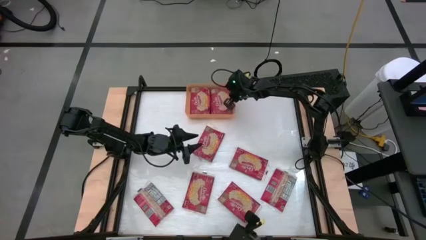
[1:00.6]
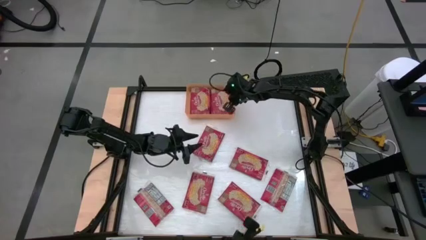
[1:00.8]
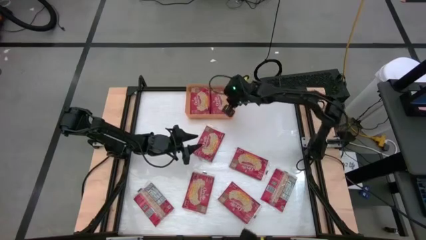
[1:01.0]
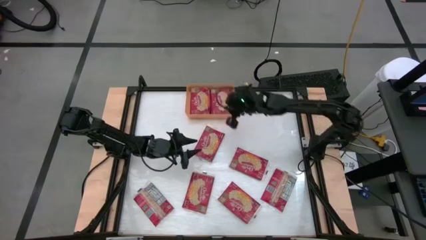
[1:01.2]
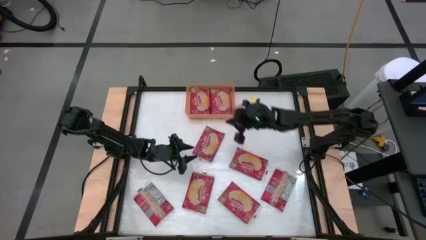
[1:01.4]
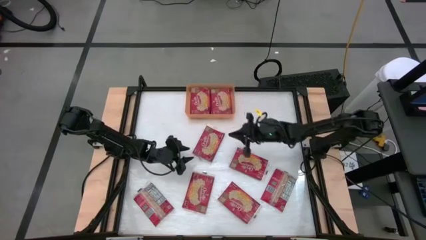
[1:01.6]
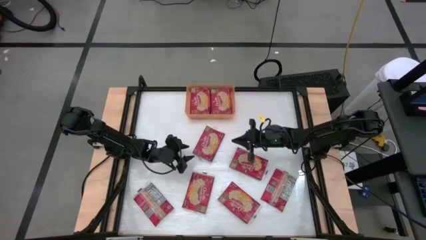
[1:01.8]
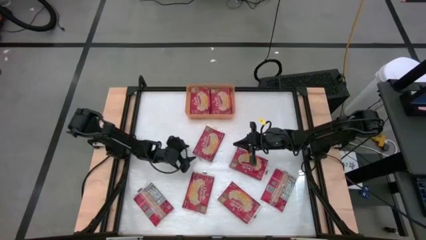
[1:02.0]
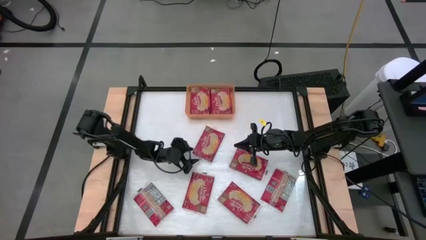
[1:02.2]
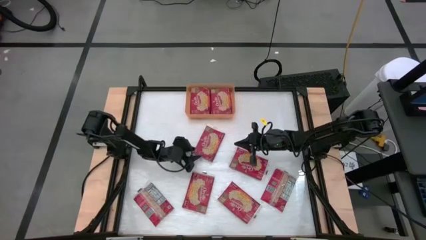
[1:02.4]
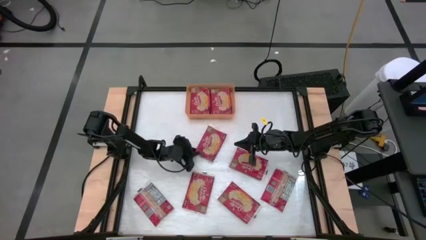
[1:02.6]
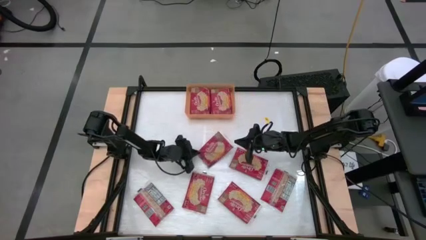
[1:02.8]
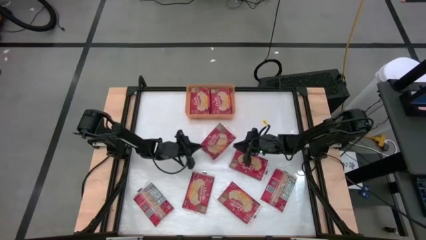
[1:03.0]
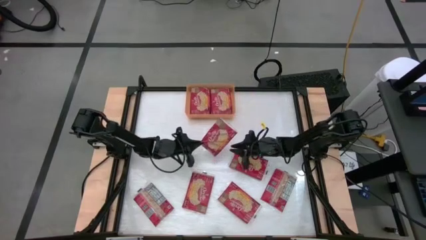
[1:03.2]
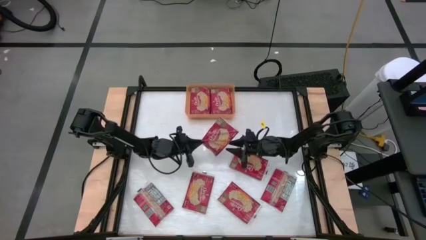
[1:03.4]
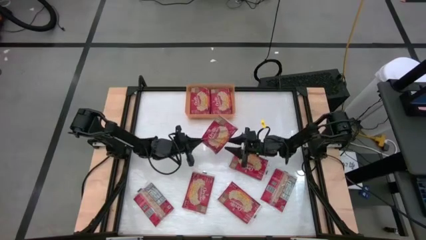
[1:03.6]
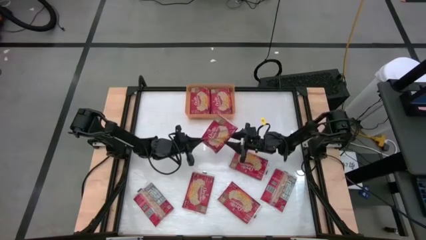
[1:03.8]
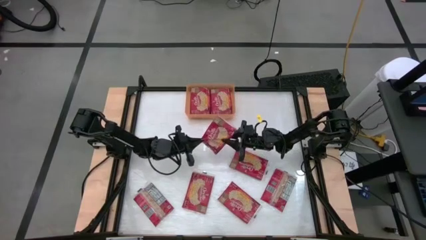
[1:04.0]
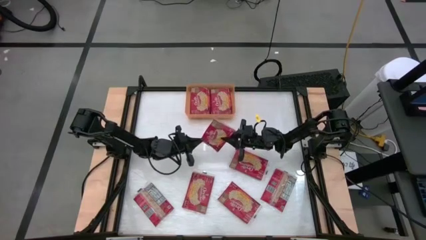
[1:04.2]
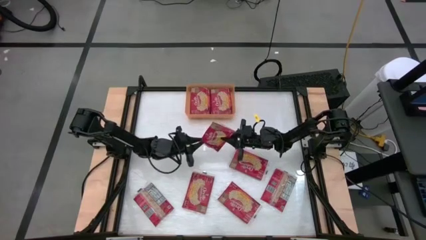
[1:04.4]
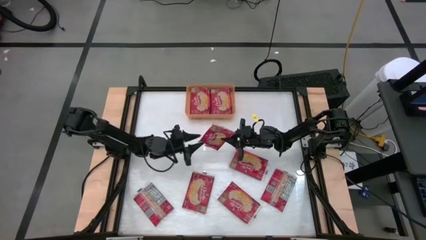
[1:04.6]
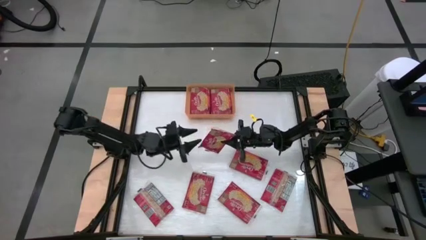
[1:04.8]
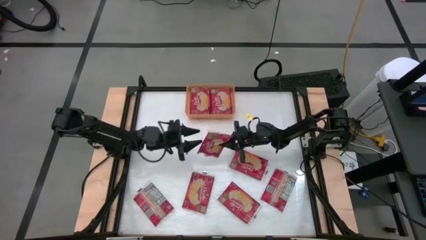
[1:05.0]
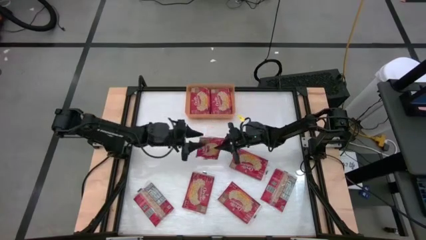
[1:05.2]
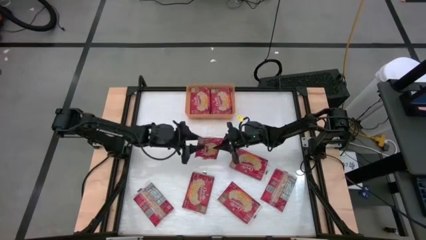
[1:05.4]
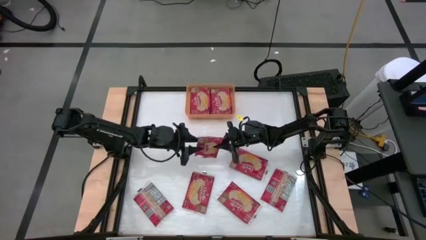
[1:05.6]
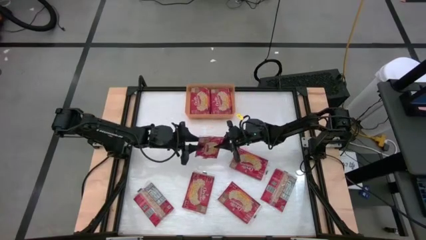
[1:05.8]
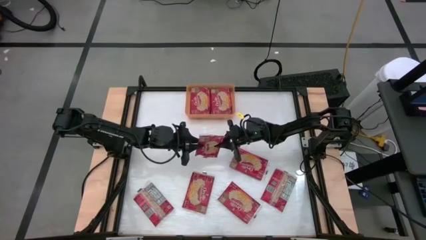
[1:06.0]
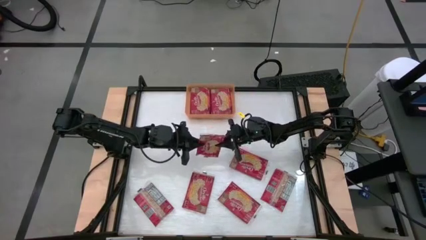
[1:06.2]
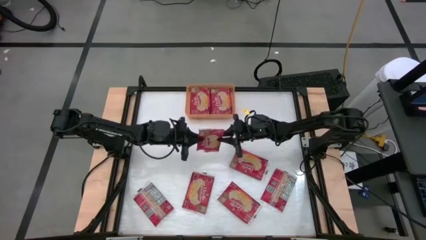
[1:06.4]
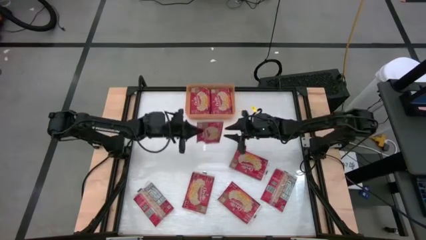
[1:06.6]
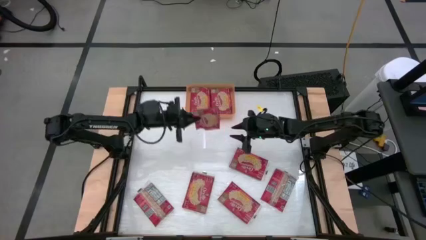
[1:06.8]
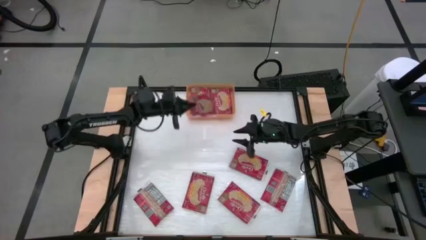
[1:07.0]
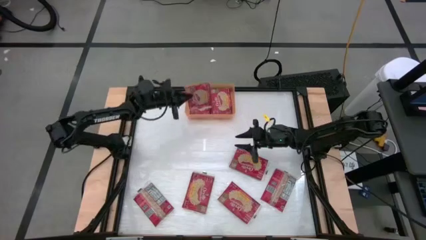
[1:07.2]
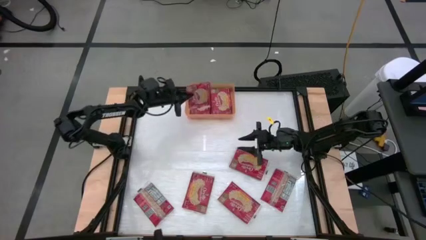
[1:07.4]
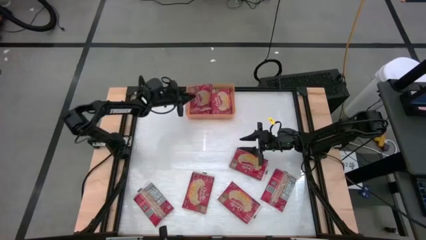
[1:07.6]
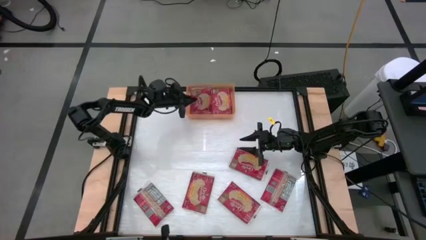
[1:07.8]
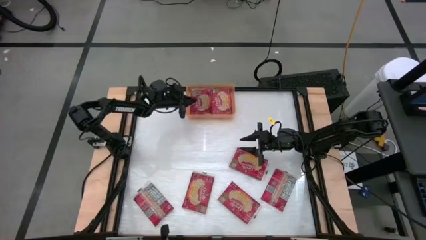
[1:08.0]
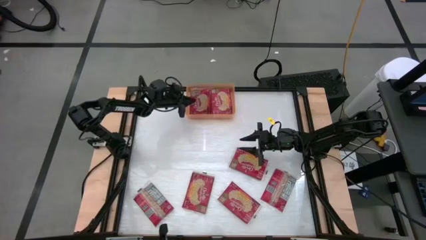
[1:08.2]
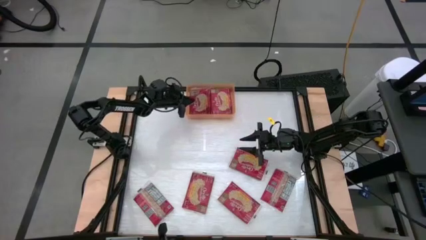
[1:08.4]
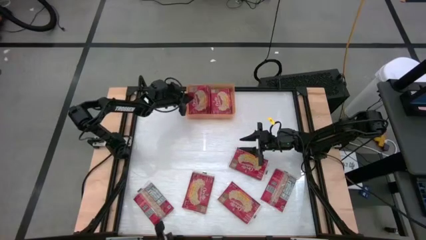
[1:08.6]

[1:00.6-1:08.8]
Task: Sort popcorn bags into baskets
Put the red popcorn bag into the orange bin

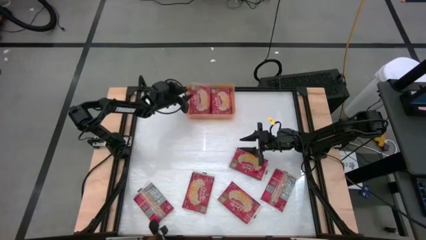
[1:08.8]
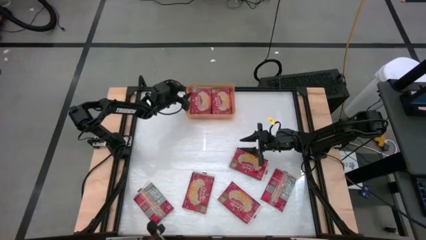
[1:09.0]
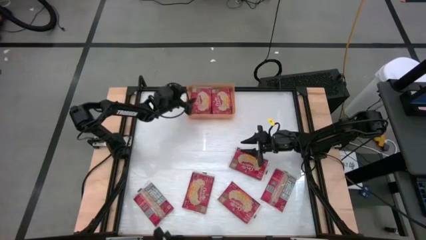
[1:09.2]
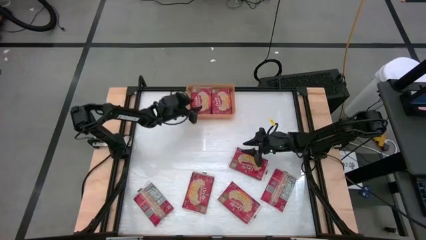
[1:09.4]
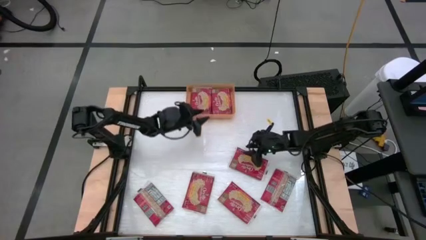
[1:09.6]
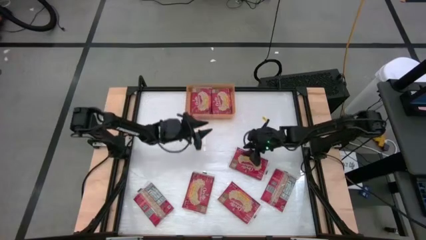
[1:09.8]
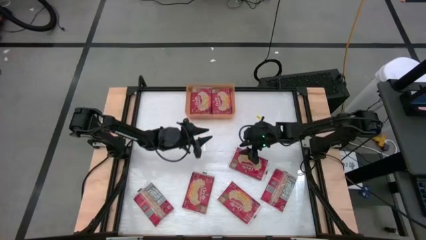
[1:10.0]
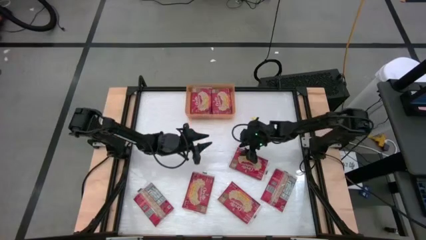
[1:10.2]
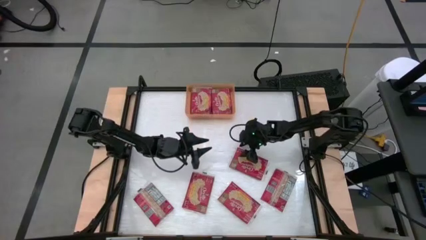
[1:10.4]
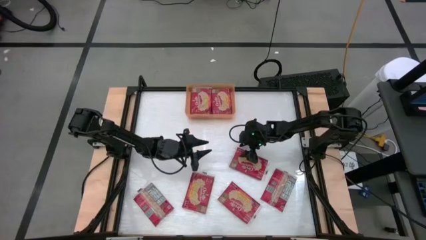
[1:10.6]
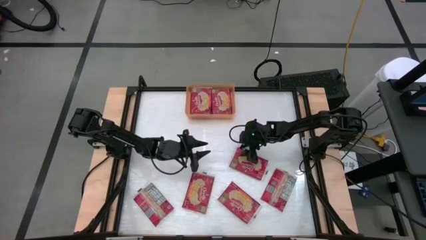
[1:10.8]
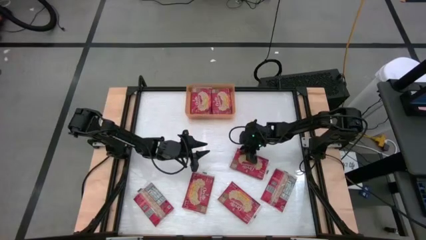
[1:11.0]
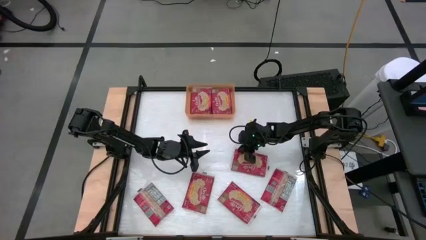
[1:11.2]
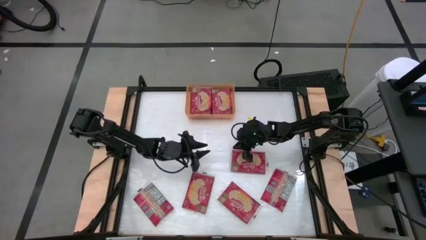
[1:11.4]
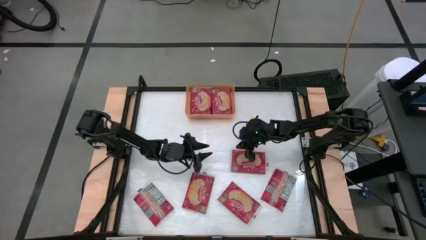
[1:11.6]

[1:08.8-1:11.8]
Put the red popcorn bag into the orange bin

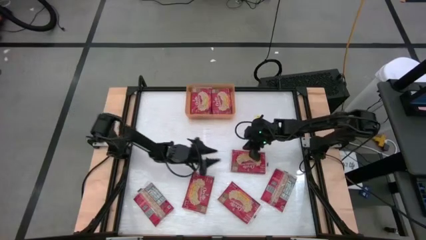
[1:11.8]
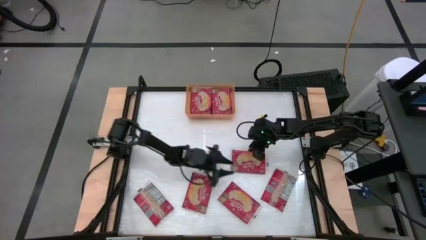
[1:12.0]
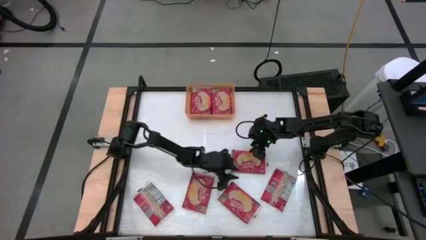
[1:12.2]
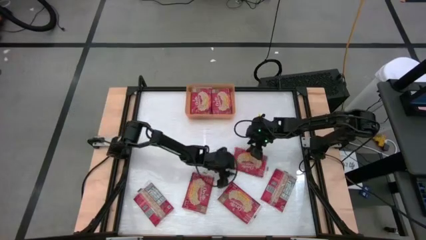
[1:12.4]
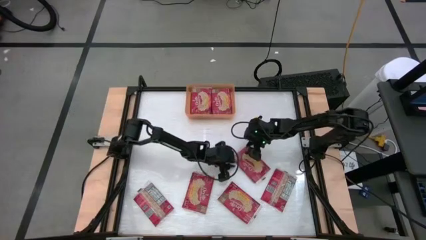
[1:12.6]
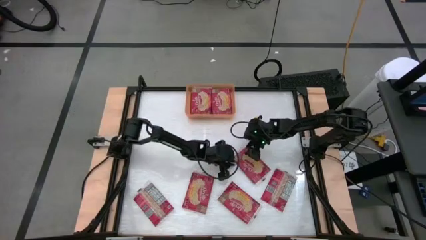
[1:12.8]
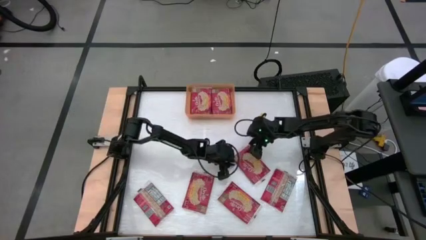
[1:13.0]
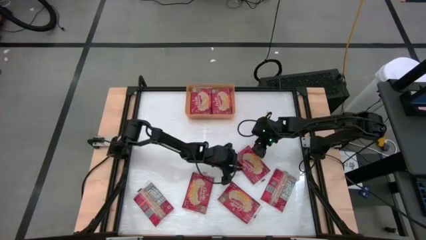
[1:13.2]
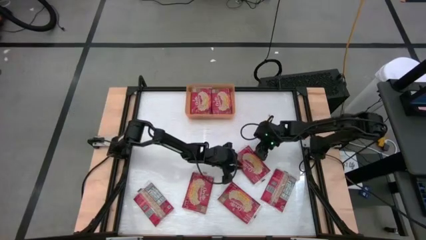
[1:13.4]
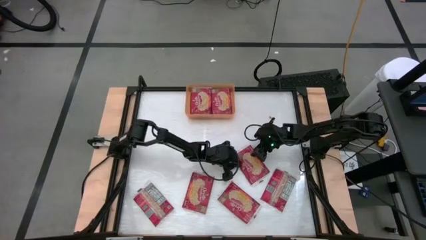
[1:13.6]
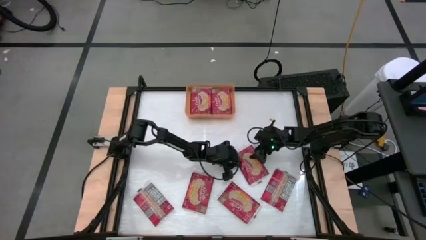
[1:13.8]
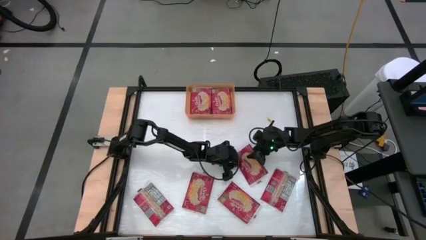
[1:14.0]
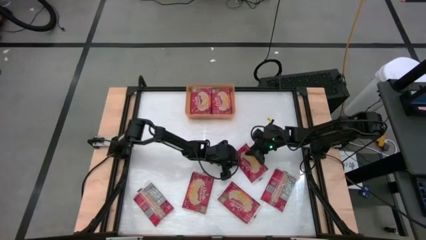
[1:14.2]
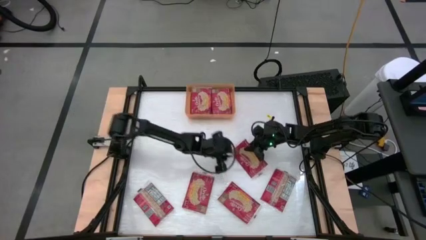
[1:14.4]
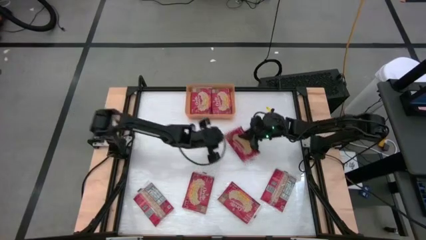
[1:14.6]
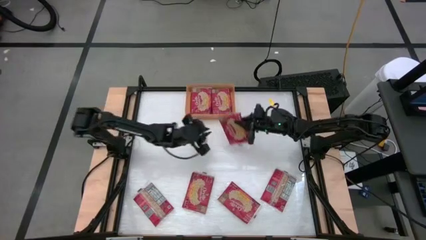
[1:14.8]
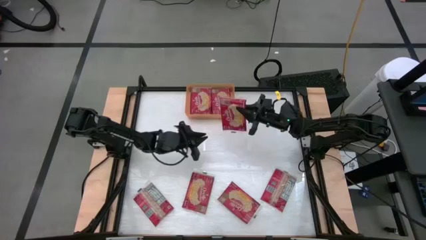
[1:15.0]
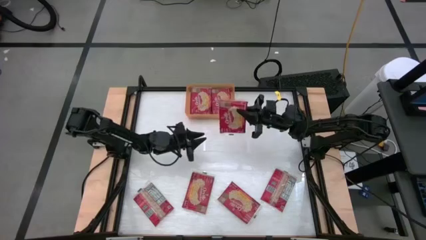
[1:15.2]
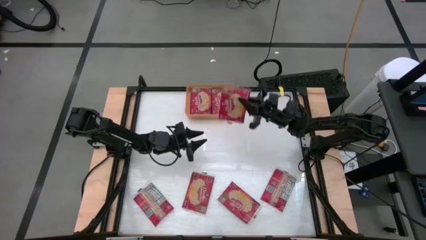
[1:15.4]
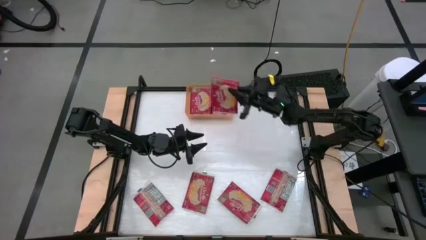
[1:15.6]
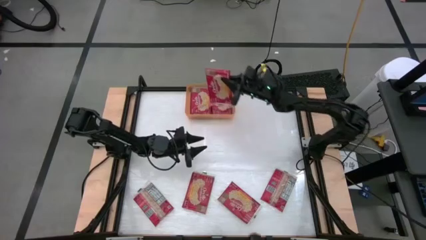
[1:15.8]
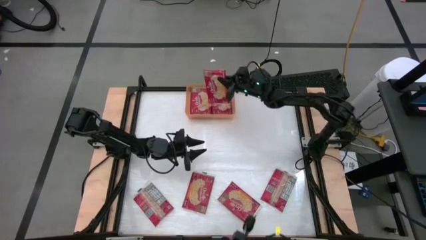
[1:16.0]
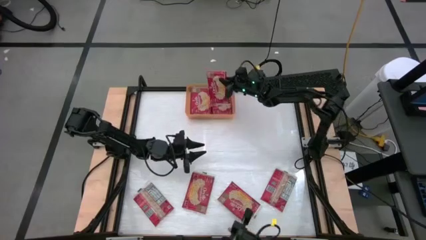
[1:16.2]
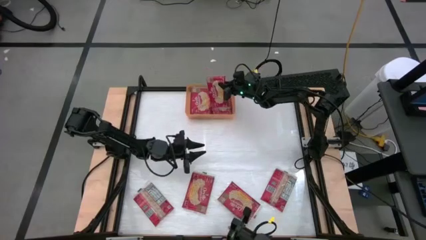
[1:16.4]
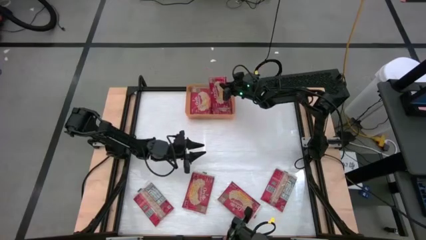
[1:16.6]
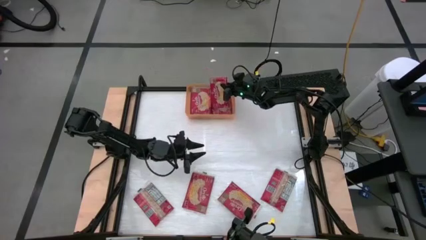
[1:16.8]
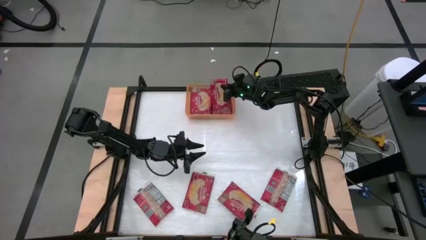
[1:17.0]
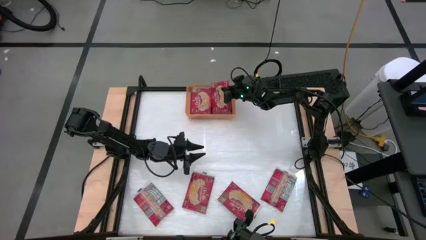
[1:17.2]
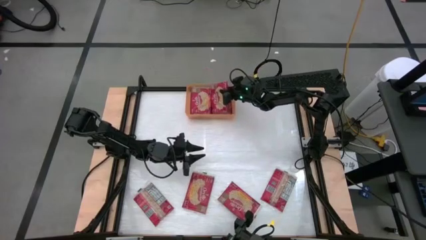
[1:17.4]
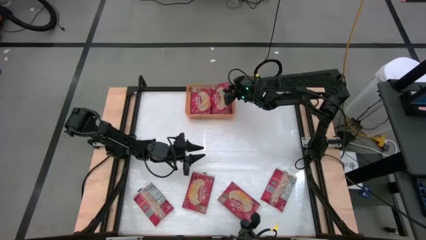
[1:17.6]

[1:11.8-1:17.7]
Put the red popcorn bag into the orange bin
